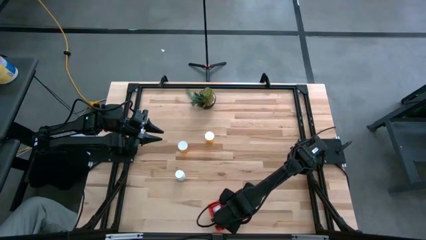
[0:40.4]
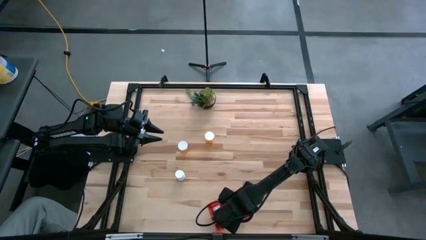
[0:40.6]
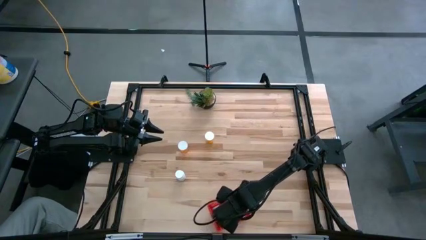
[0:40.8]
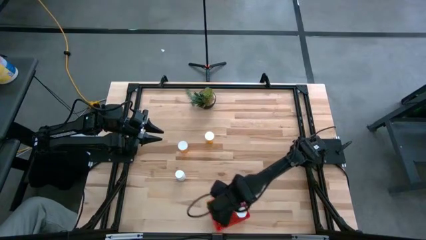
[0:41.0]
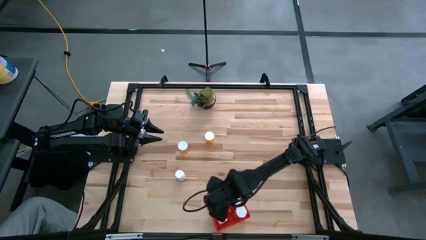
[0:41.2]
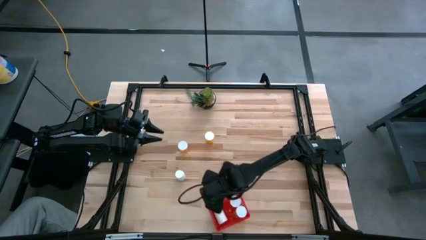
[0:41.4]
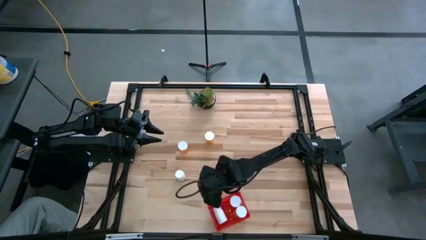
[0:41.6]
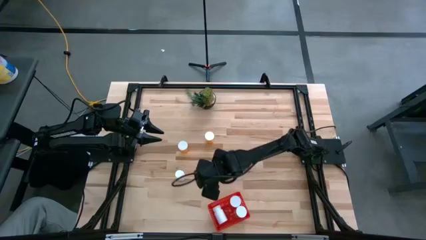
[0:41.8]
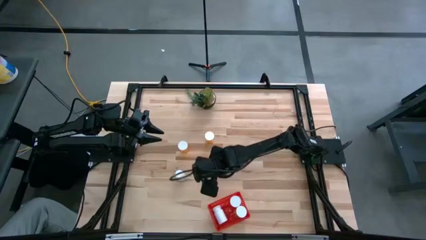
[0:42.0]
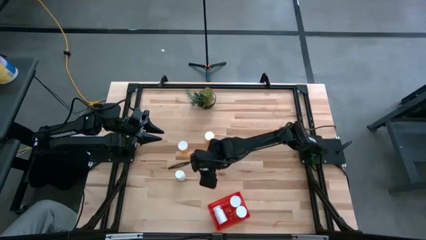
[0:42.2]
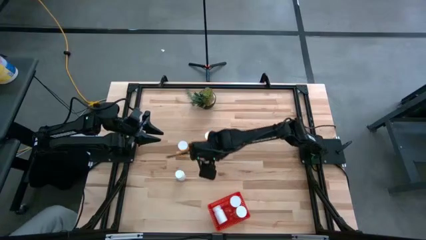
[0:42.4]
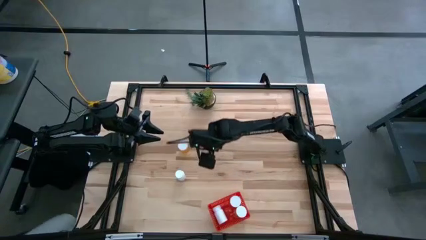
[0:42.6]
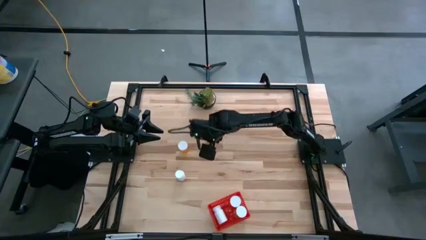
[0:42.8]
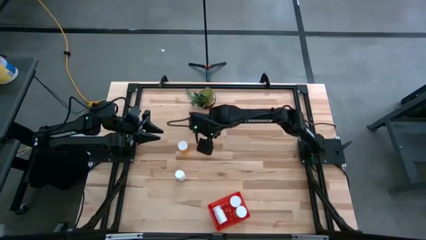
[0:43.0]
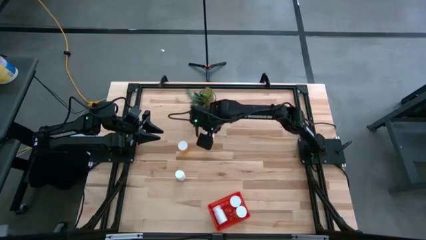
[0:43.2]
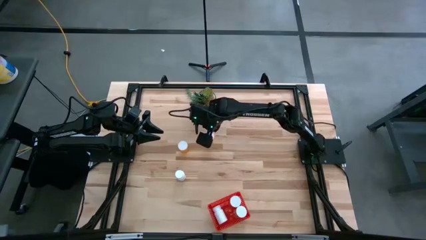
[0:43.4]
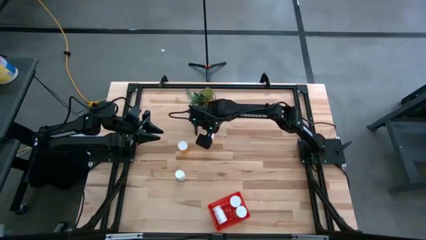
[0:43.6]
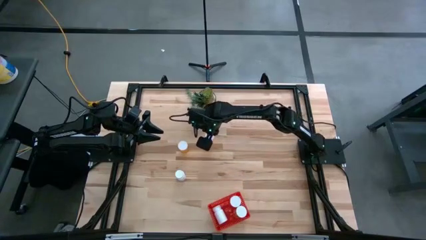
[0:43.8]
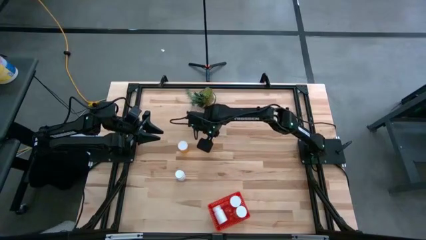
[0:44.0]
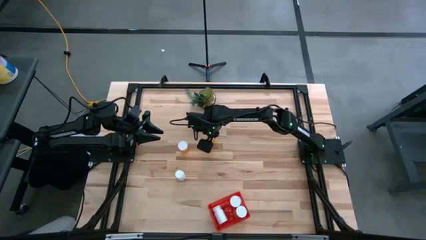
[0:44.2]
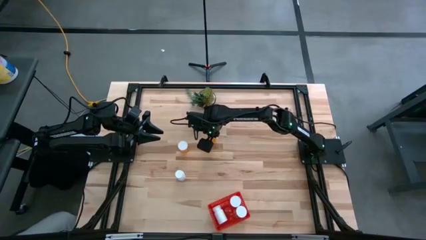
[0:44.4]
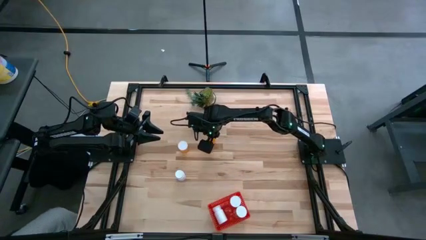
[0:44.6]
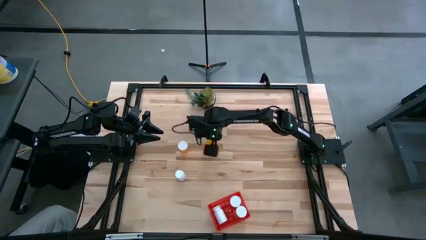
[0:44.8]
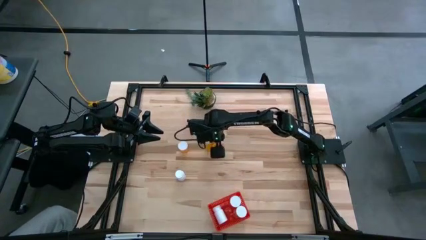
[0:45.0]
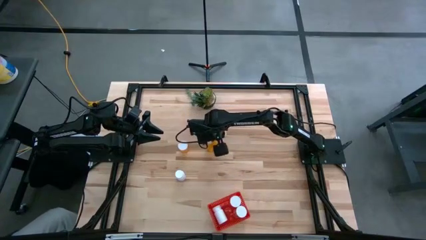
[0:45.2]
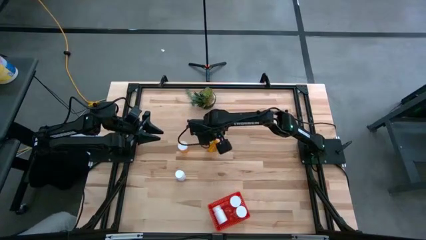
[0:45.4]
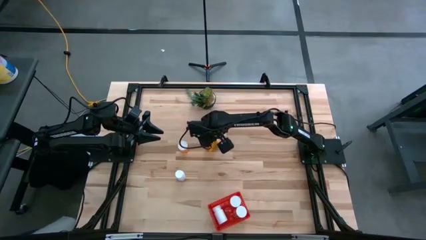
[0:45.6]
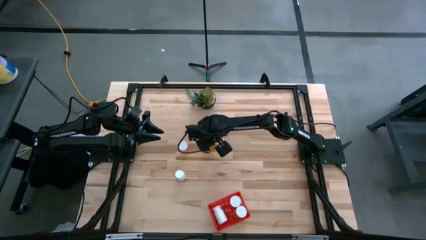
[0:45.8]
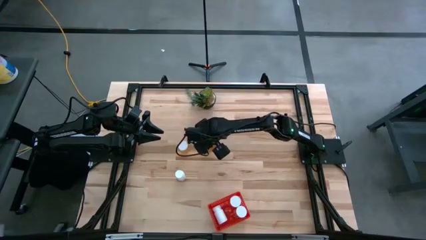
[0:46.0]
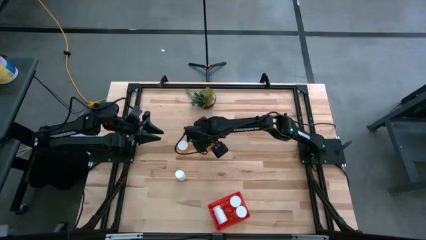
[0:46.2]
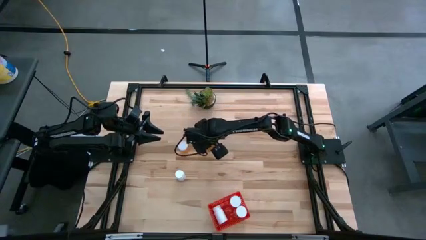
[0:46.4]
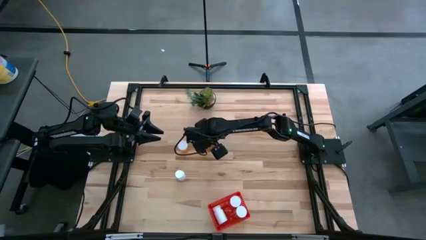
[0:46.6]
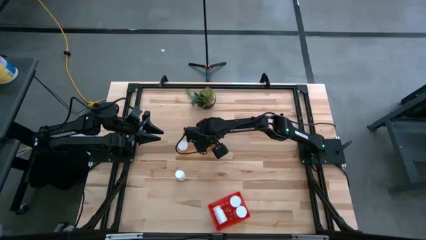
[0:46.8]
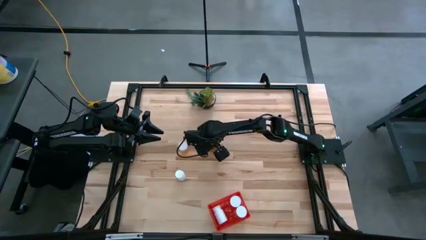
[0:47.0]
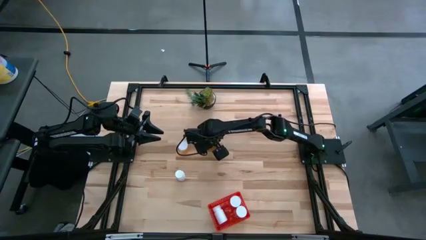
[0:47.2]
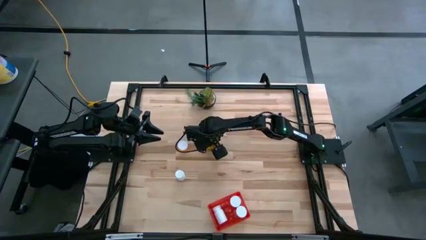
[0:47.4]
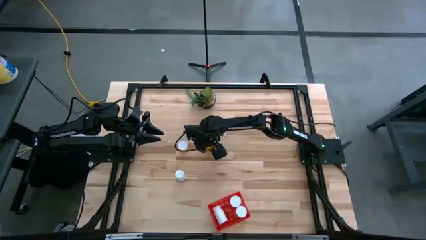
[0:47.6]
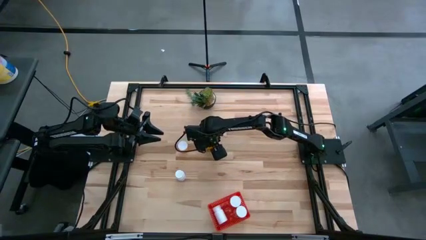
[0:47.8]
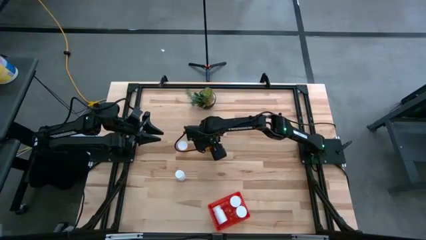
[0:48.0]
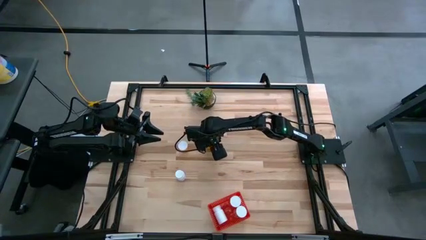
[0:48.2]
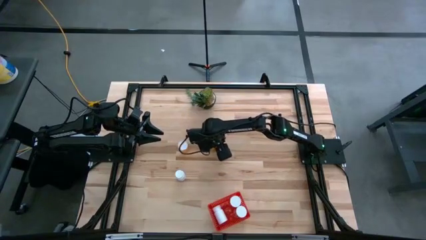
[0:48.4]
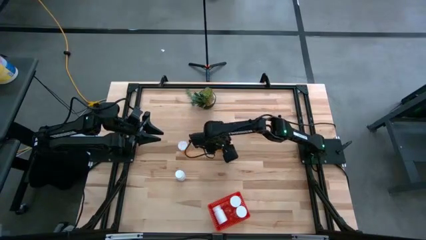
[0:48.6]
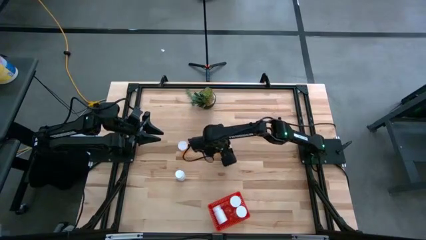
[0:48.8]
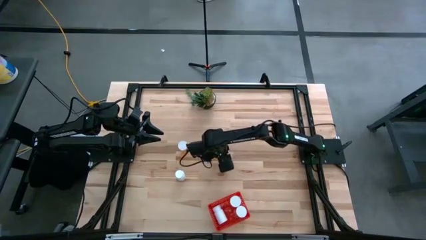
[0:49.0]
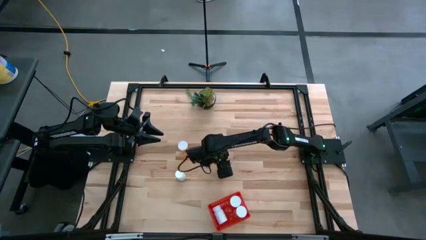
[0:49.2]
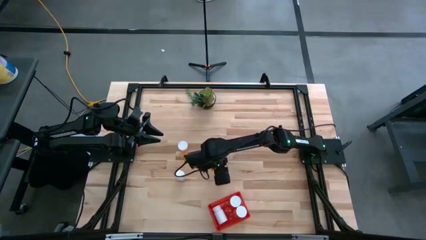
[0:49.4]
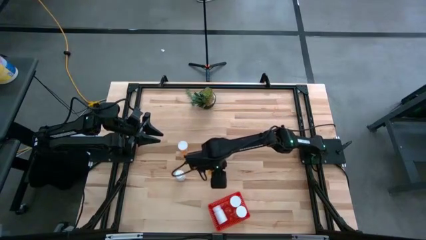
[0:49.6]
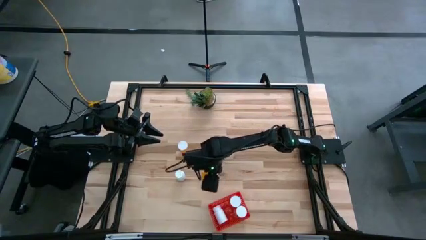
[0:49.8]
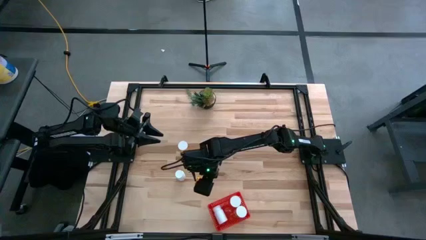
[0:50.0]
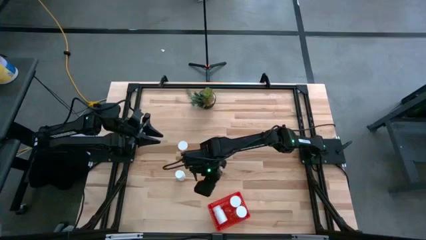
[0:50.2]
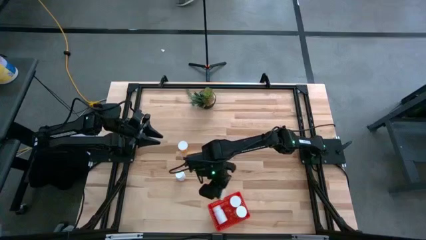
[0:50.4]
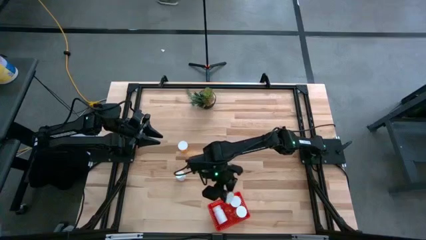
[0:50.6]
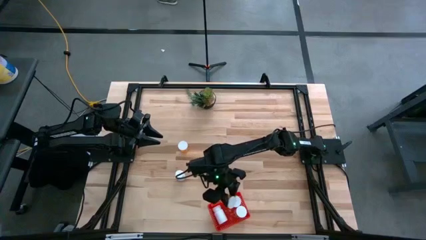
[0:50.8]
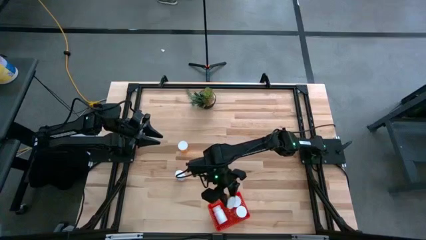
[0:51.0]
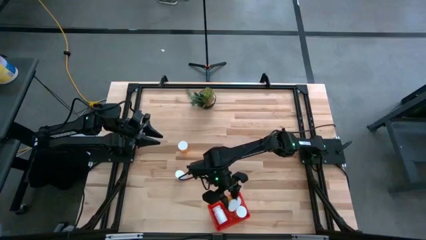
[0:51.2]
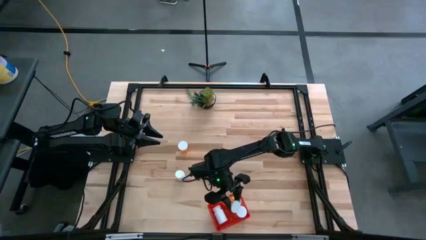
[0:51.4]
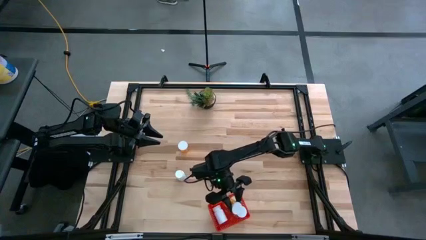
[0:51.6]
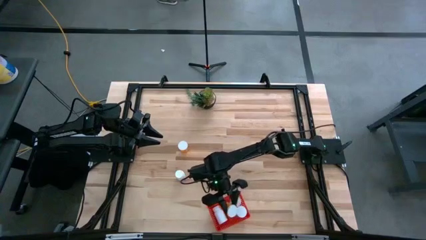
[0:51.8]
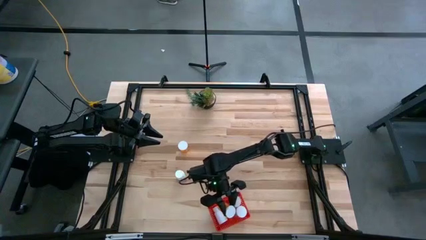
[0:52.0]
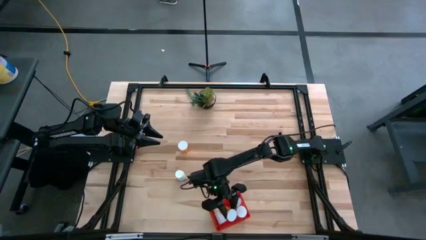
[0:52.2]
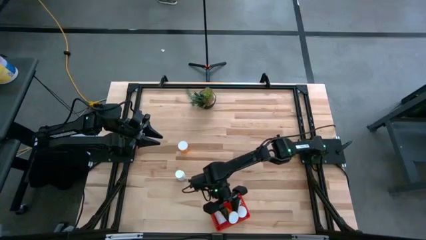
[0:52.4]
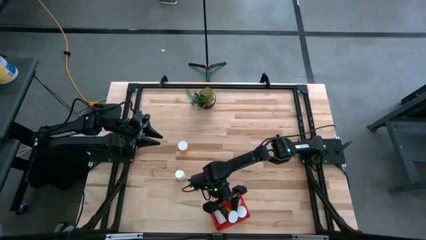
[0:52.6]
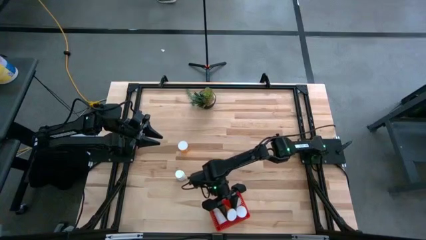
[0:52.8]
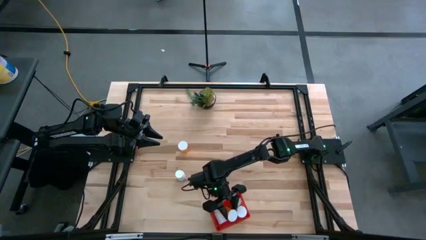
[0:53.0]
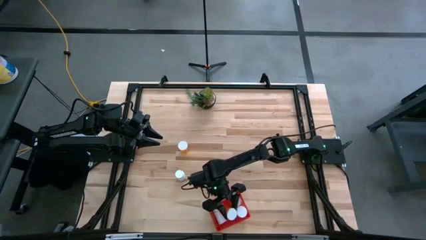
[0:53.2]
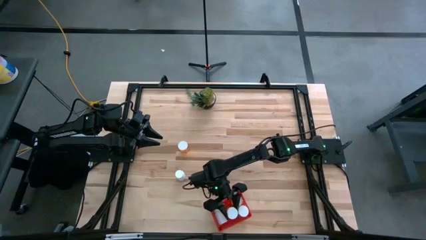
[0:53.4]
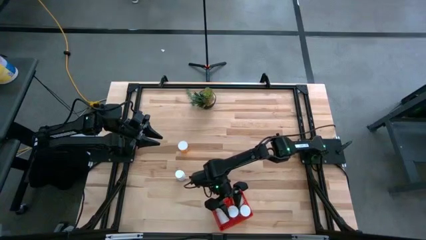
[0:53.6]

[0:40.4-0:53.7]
Task: Pick and place pill bottles into a basket
Put the right orange pill bottle into the red bin

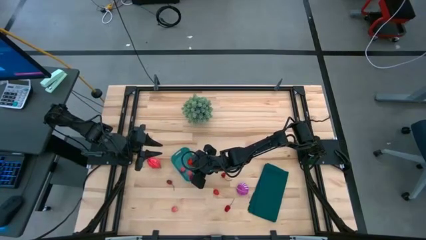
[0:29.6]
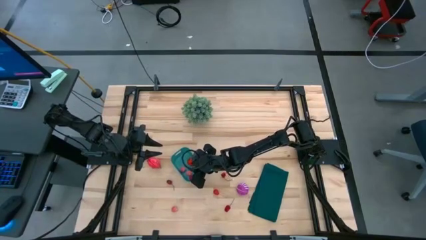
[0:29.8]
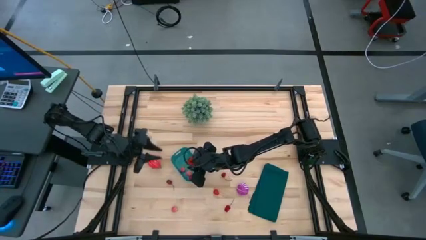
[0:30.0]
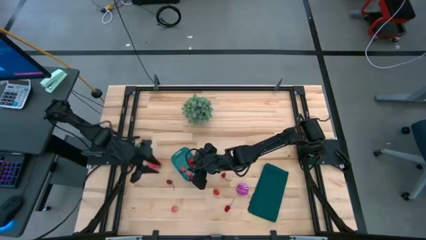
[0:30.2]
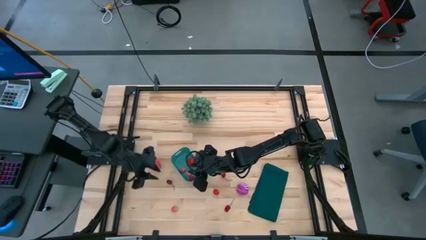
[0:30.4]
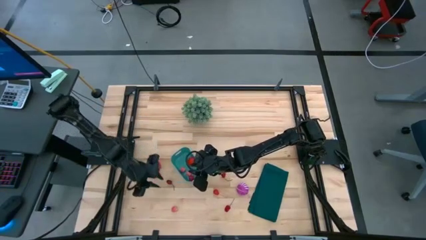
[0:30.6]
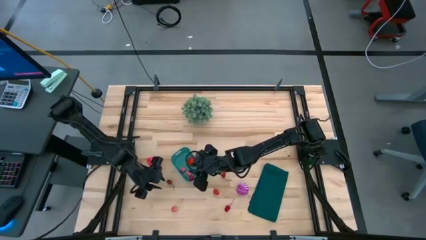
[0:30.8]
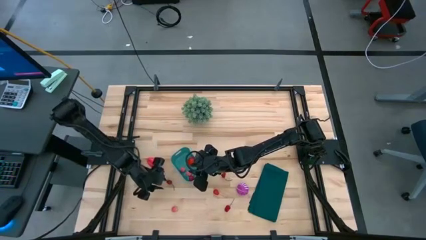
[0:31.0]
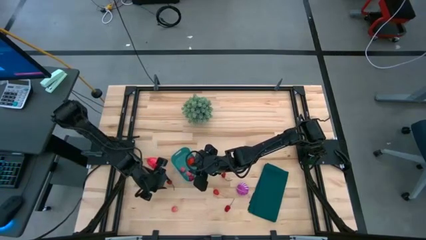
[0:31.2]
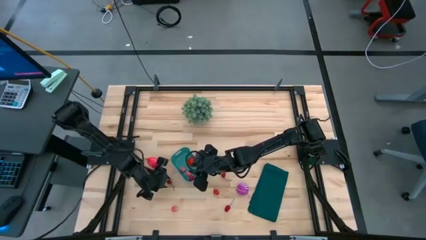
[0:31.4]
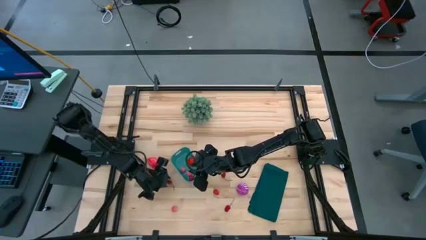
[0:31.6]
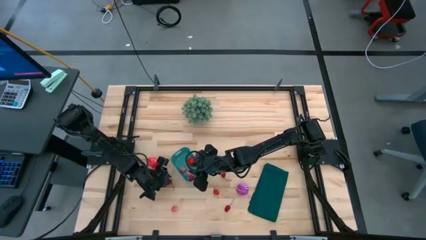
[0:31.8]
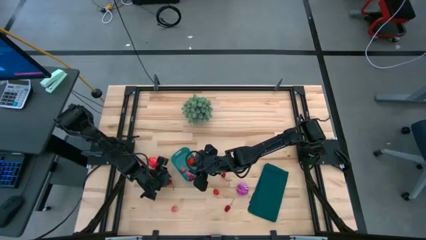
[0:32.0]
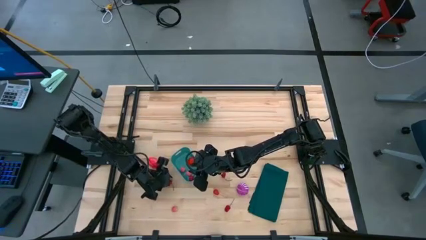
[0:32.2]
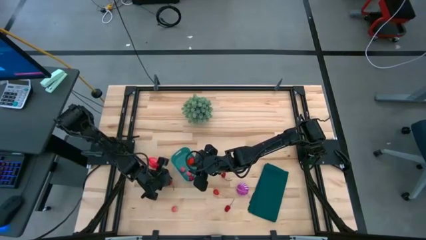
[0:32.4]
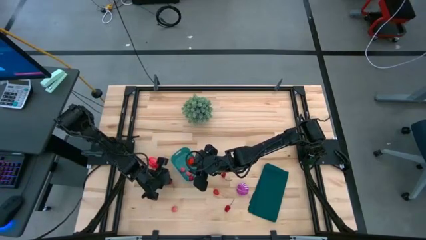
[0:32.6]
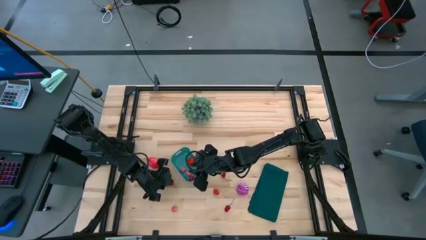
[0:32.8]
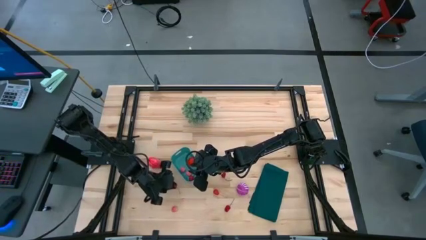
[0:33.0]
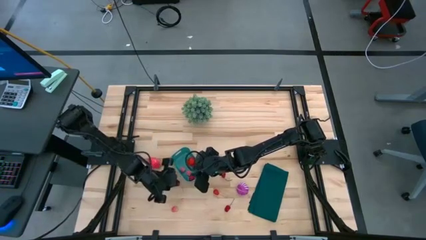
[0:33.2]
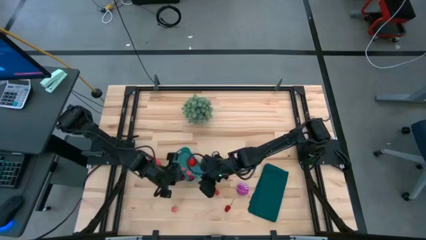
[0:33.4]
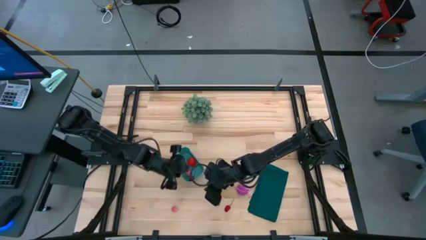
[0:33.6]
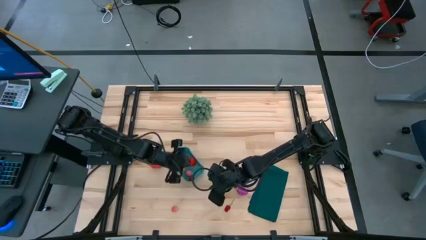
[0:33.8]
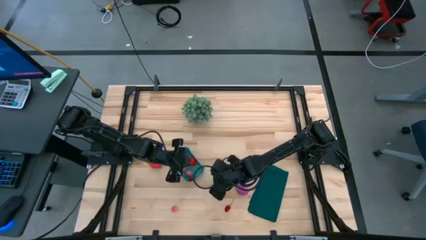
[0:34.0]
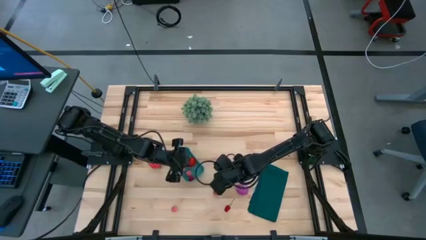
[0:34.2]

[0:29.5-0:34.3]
Task: Pick and placing Produce into tupperware
Put the red cherry into the green bin
